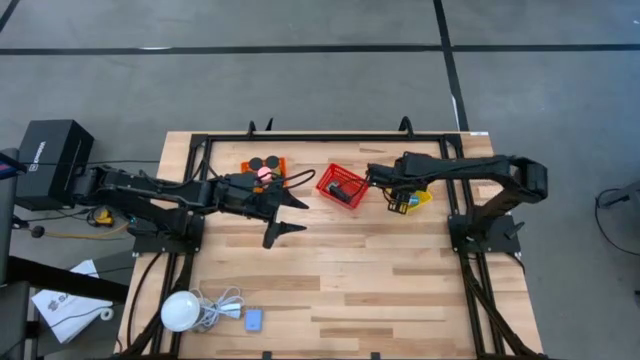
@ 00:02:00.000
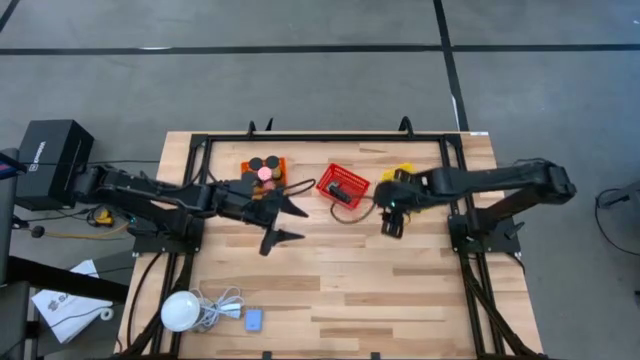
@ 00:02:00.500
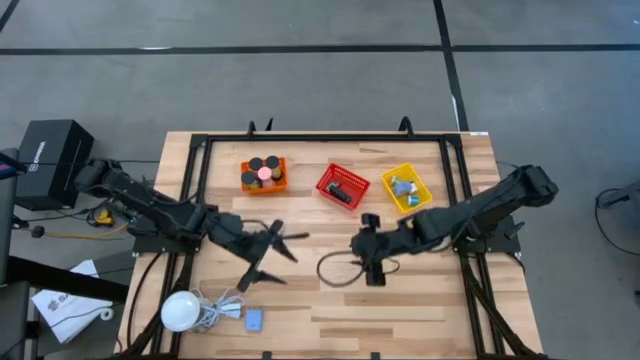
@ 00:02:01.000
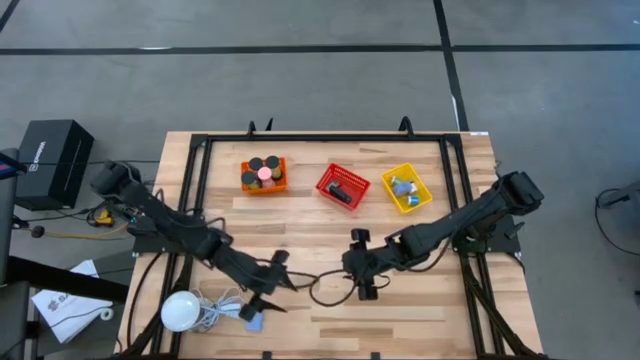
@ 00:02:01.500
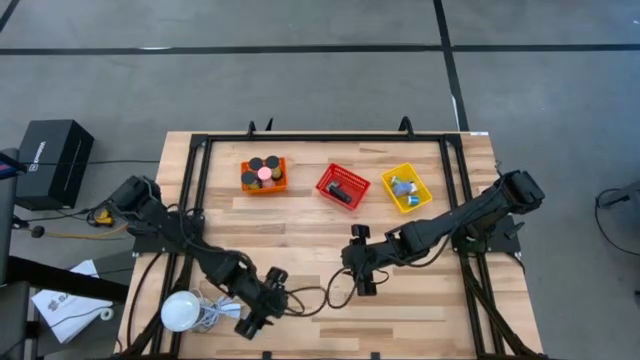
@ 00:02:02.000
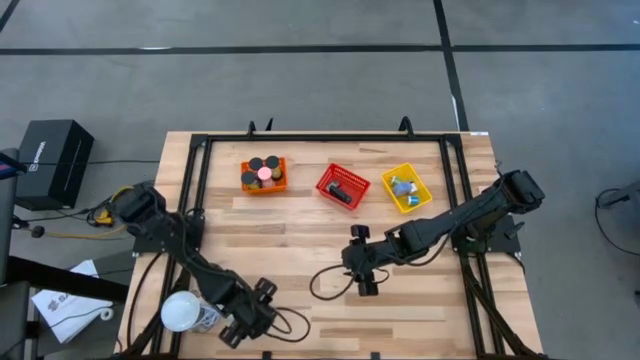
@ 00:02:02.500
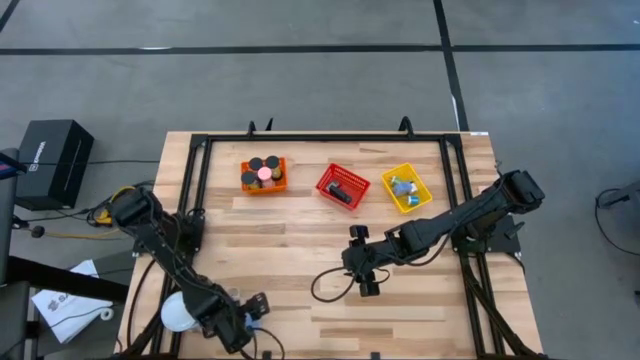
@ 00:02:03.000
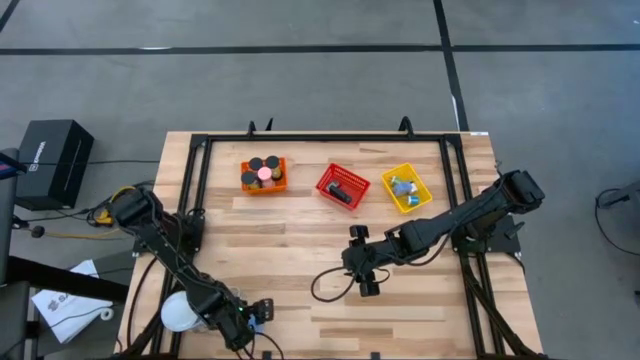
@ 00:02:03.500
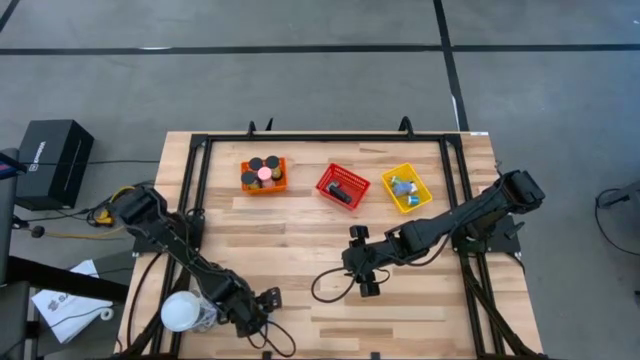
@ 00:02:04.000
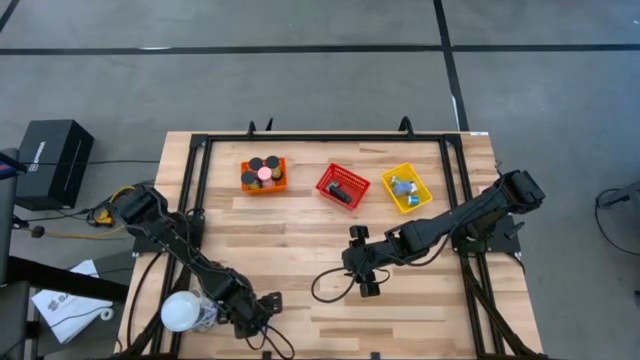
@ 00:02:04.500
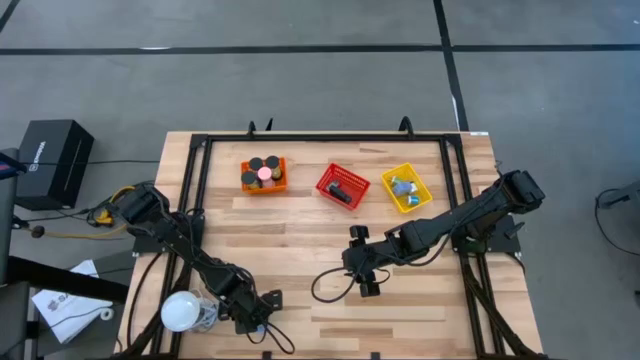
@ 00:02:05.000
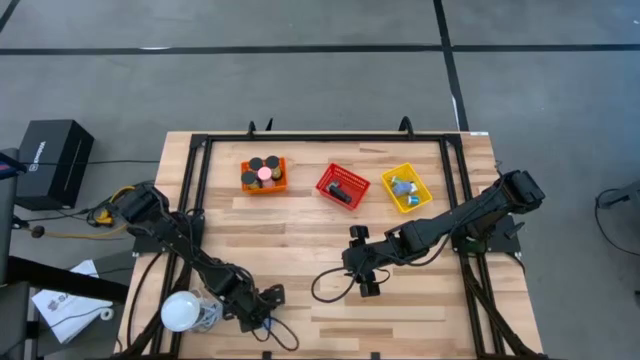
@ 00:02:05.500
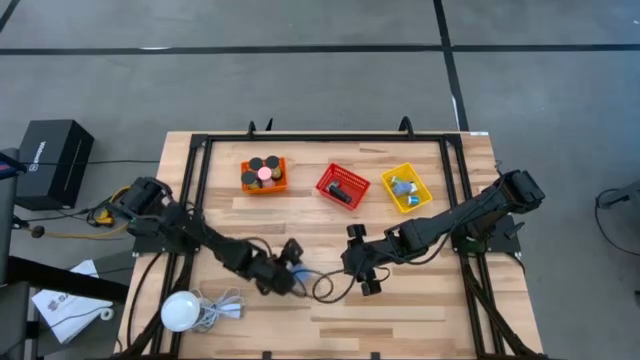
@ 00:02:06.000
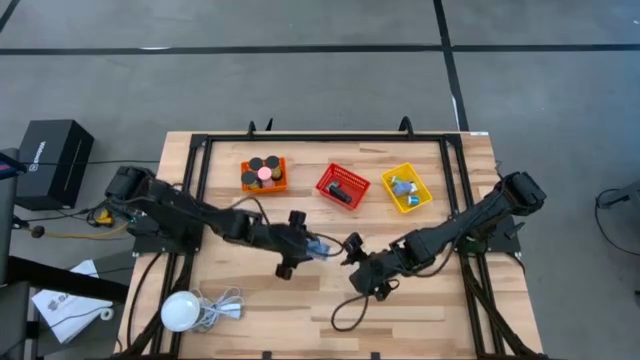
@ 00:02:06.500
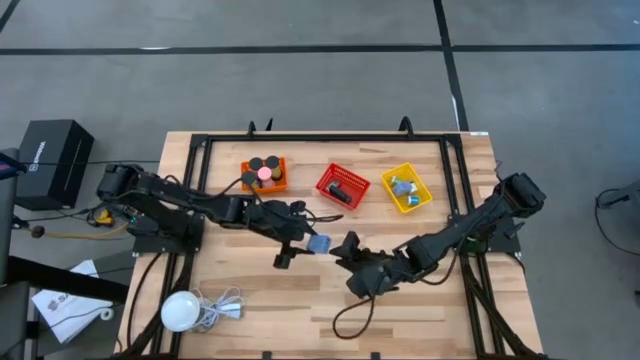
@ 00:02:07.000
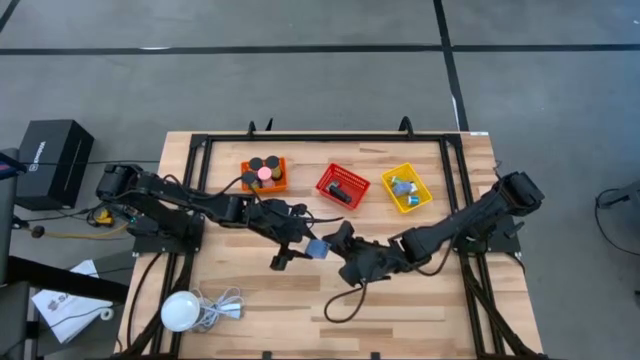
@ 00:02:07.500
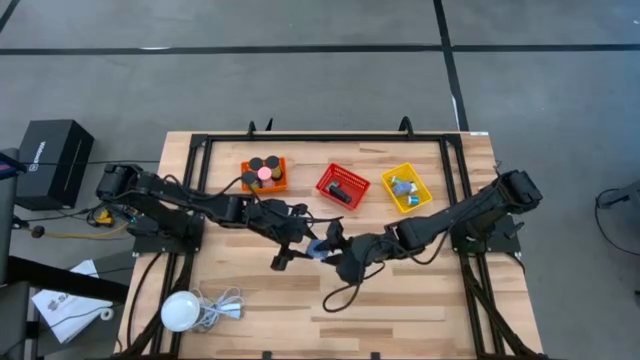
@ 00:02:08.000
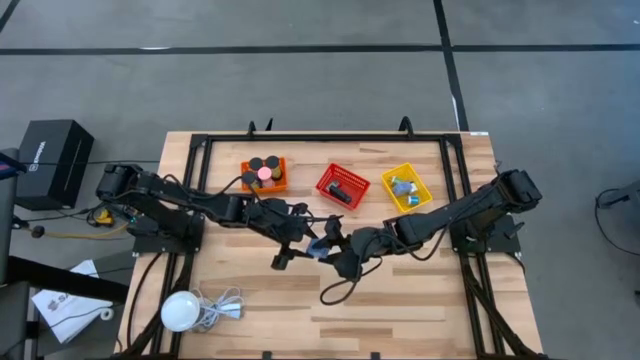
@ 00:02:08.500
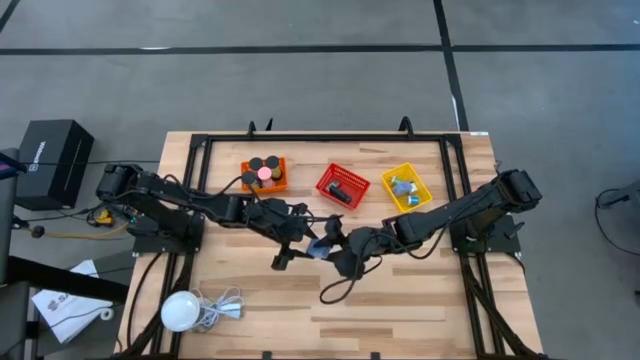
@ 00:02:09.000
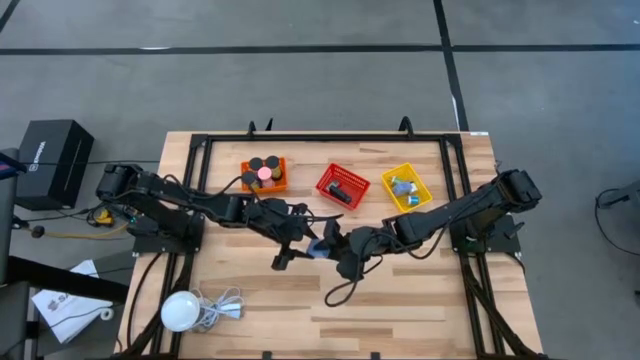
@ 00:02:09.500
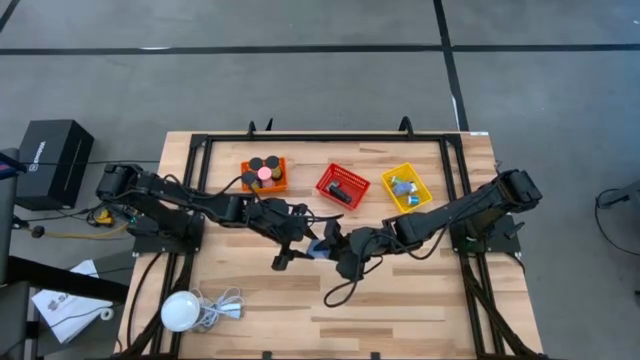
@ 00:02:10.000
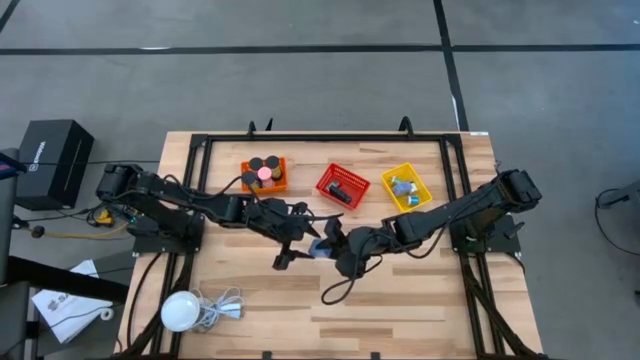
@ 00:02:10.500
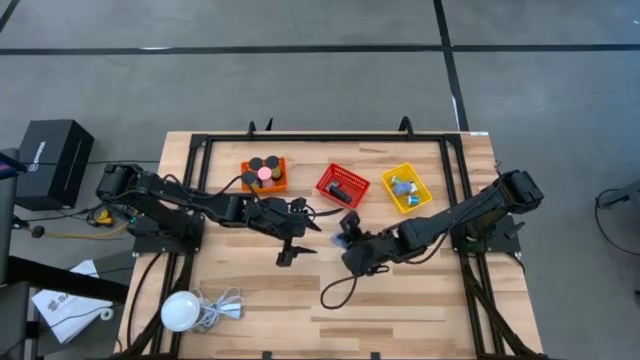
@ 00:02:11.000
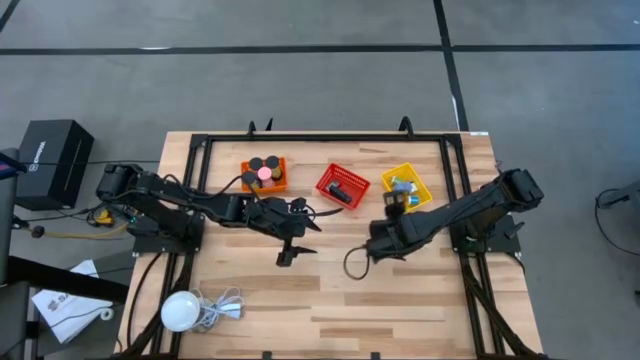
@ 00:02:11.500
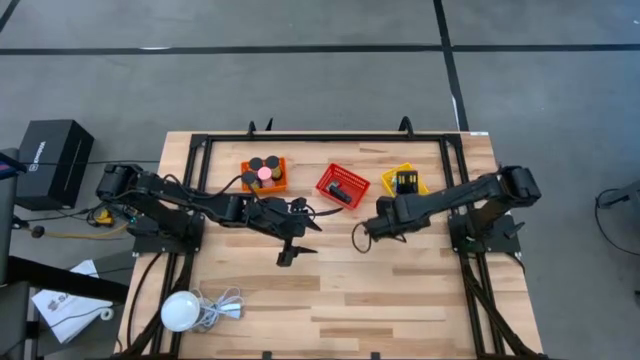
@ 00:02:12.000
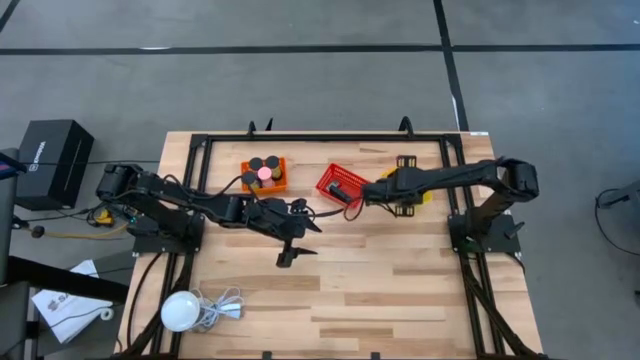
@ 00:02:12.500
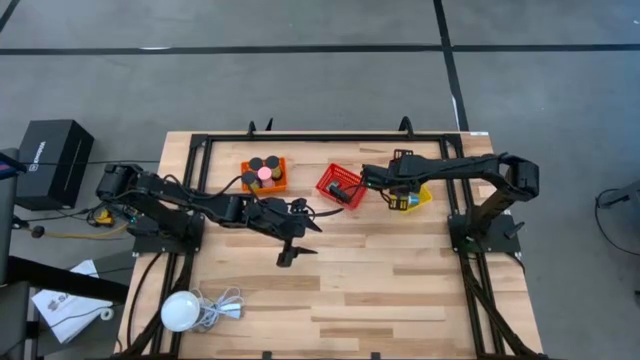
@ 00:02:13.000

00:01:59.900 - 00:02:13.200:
Task: Pick & Place Office items
Put the light blue charger adapter into the yellow bin

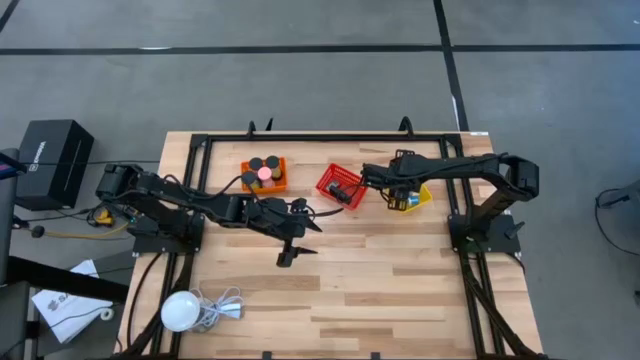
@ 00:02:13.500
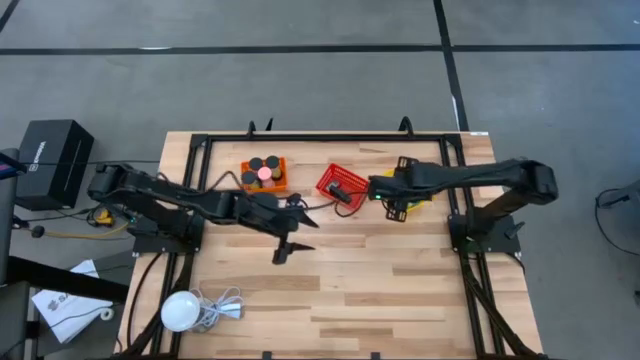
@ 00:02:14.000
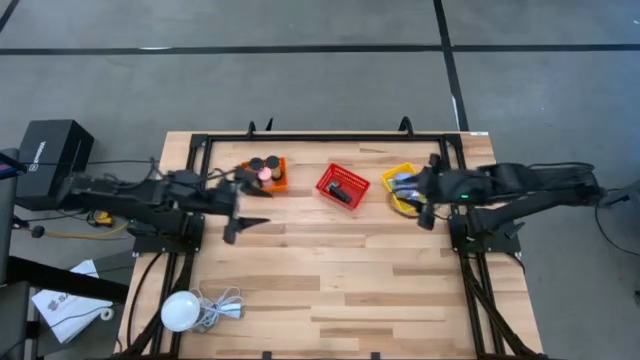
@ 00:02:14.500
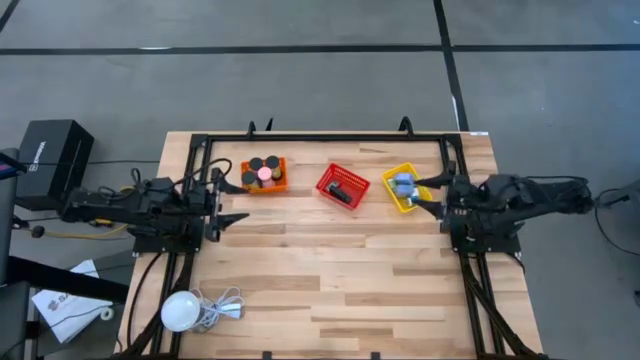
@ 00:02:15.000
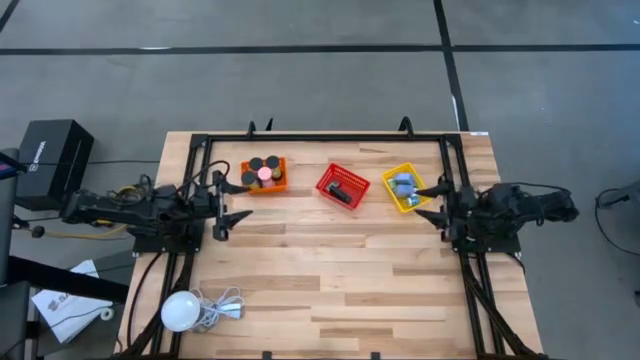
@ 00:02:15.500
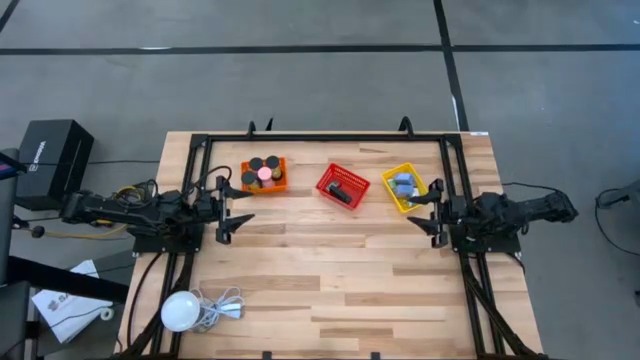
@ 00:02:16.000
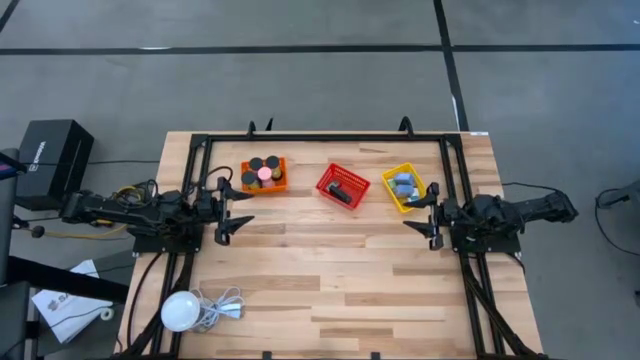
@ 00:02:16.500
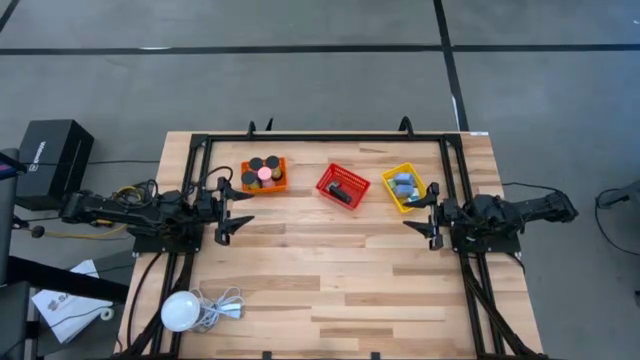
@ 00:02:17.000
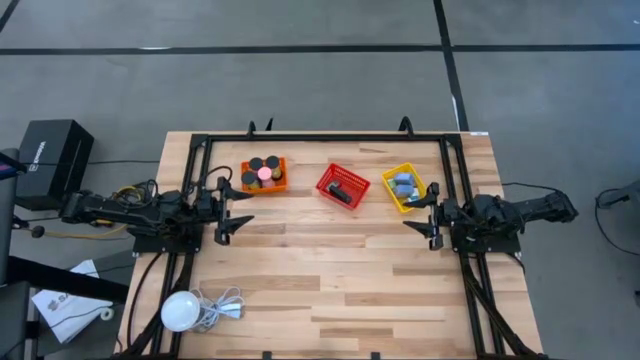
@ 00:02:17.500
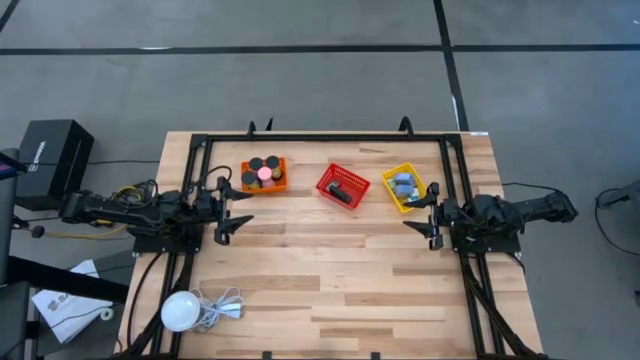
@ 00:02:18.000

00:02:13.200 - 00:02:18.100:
Return to Home Position
